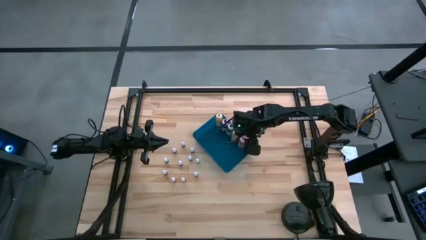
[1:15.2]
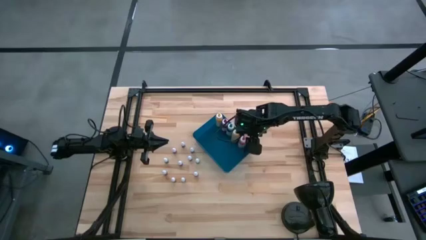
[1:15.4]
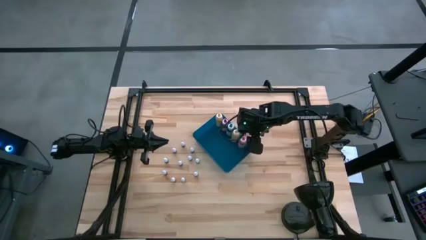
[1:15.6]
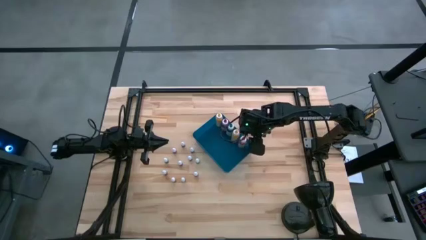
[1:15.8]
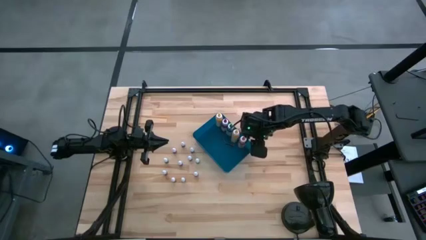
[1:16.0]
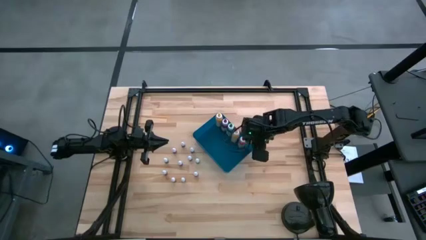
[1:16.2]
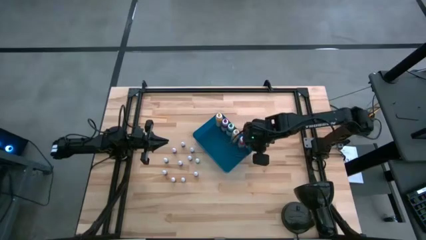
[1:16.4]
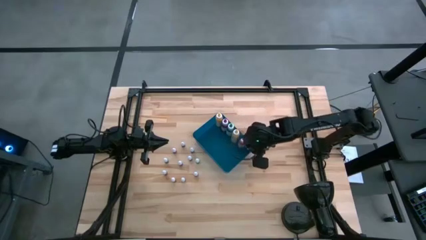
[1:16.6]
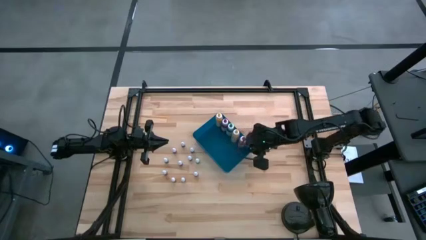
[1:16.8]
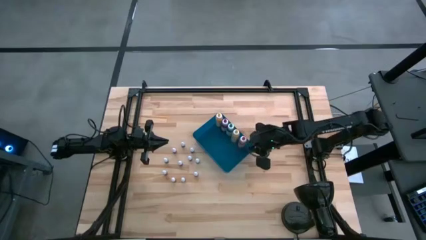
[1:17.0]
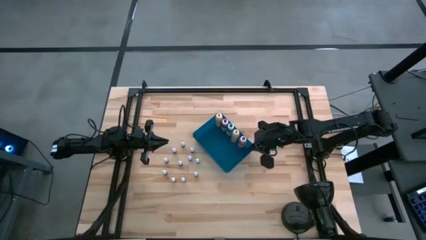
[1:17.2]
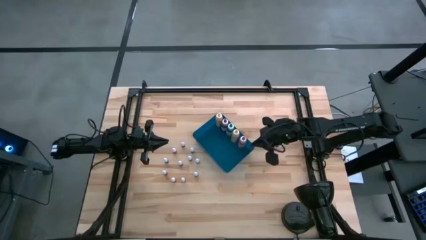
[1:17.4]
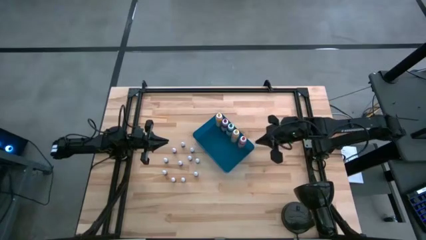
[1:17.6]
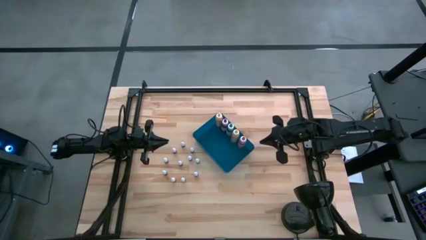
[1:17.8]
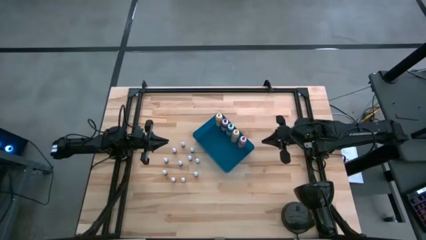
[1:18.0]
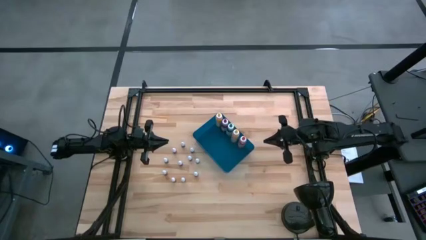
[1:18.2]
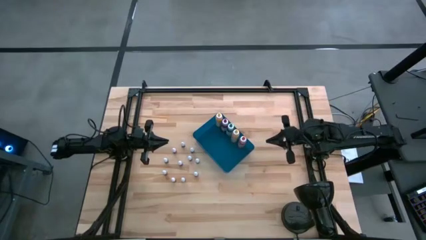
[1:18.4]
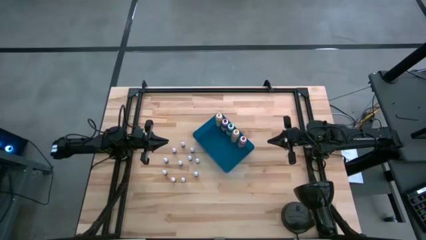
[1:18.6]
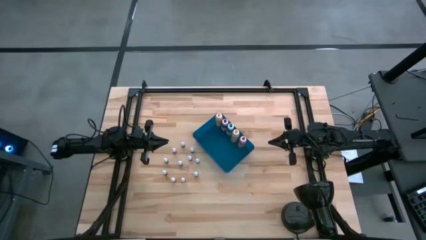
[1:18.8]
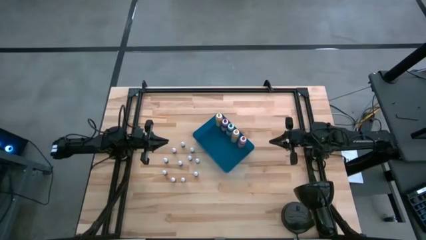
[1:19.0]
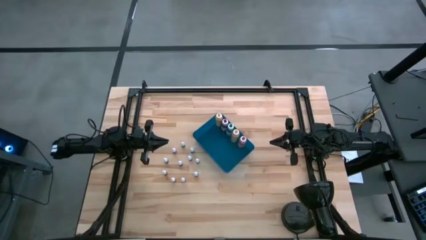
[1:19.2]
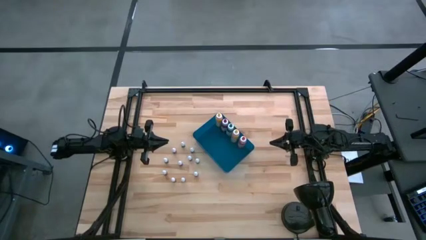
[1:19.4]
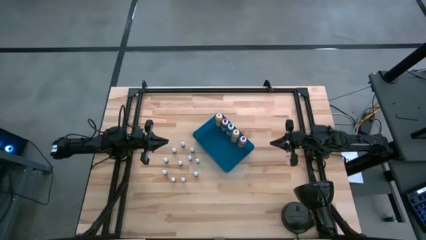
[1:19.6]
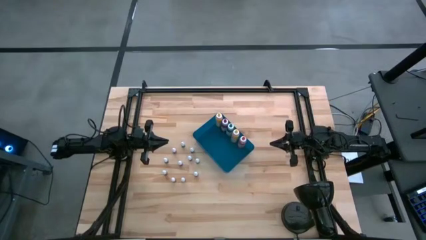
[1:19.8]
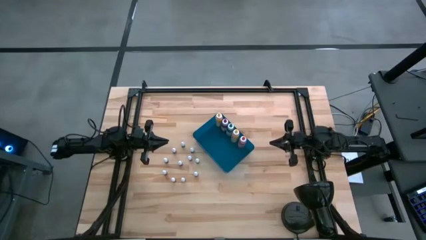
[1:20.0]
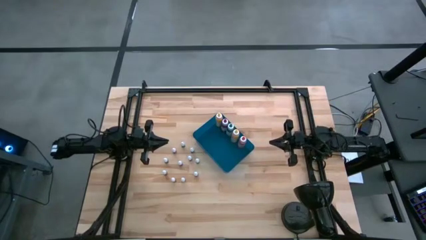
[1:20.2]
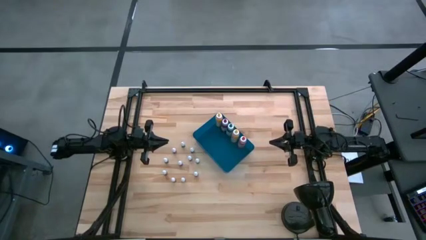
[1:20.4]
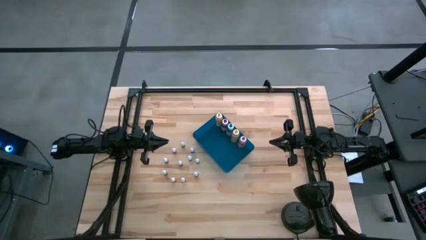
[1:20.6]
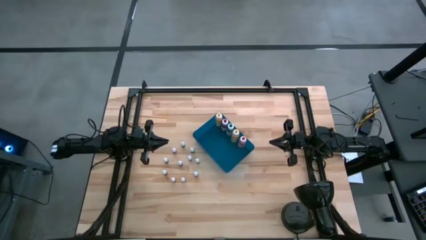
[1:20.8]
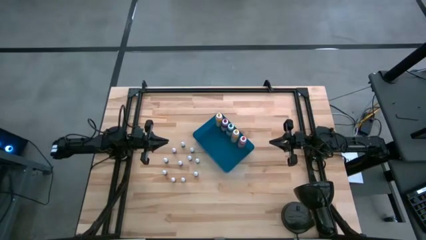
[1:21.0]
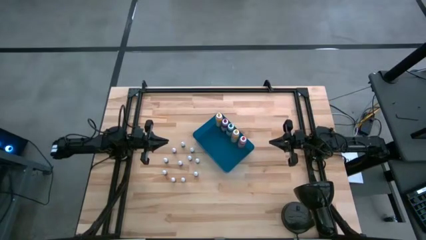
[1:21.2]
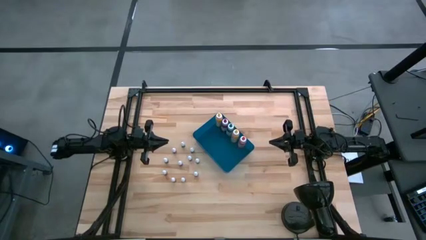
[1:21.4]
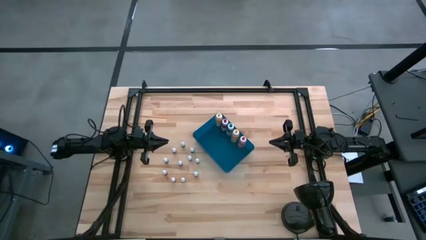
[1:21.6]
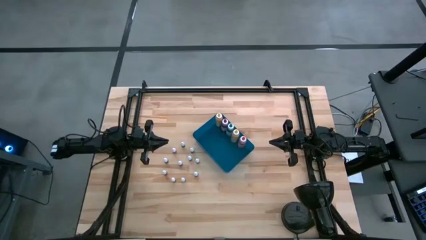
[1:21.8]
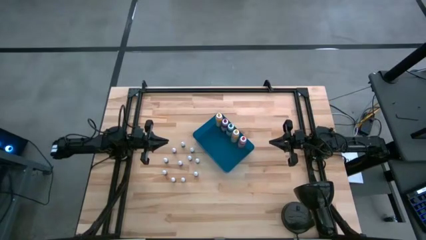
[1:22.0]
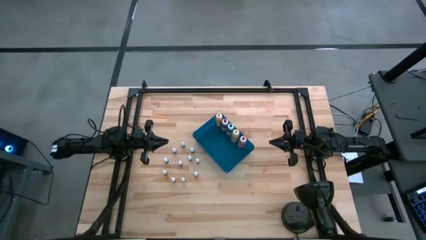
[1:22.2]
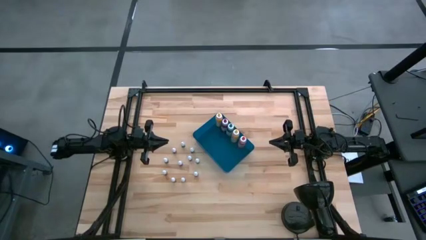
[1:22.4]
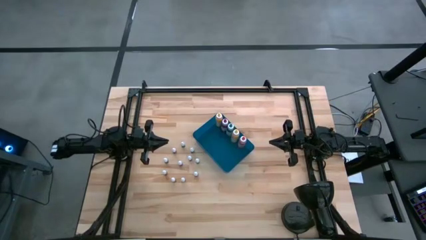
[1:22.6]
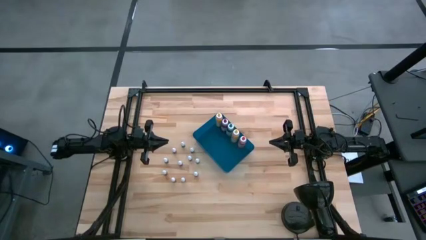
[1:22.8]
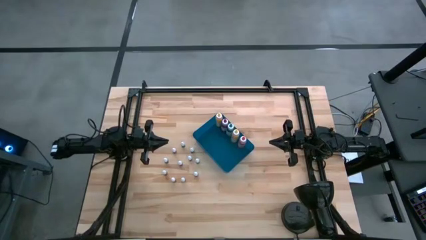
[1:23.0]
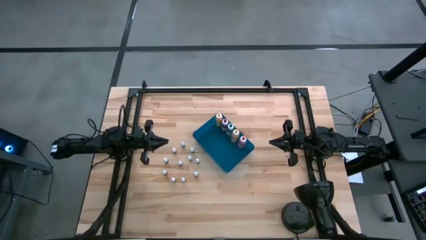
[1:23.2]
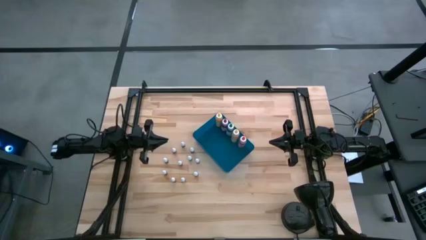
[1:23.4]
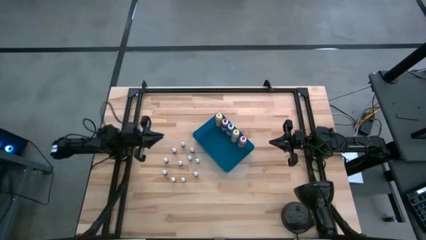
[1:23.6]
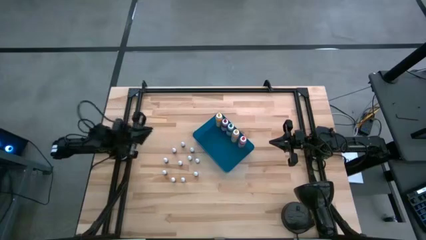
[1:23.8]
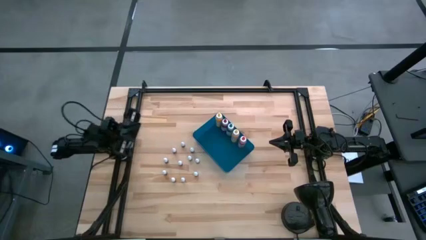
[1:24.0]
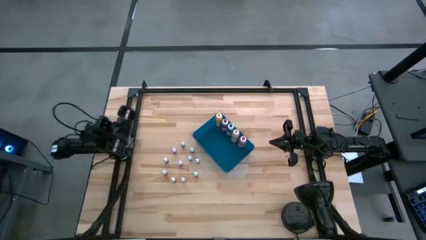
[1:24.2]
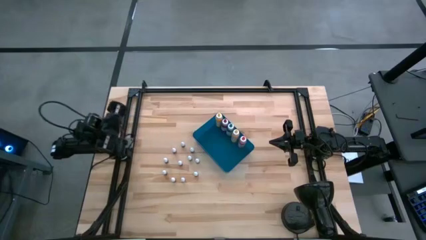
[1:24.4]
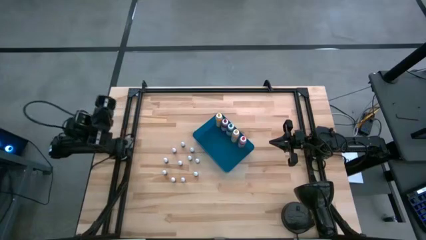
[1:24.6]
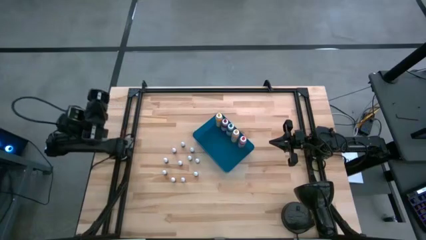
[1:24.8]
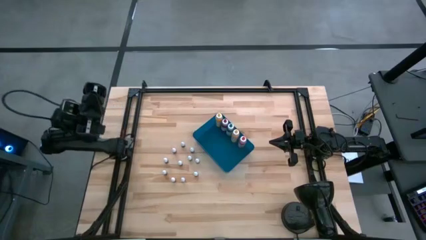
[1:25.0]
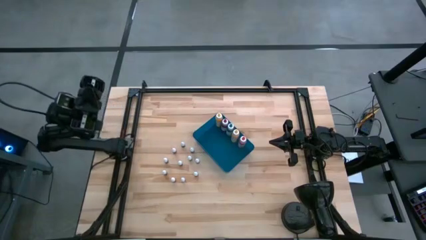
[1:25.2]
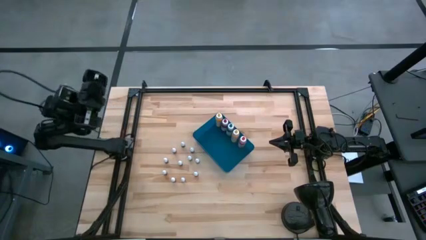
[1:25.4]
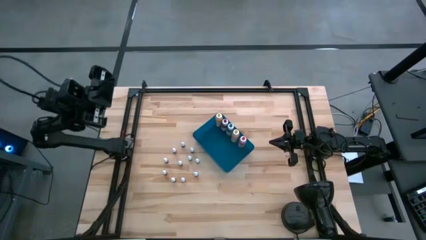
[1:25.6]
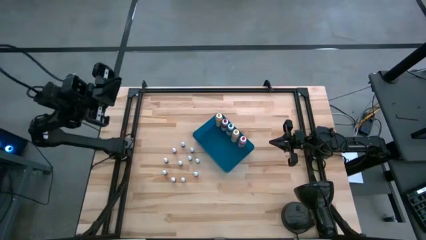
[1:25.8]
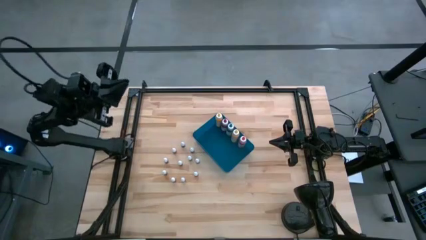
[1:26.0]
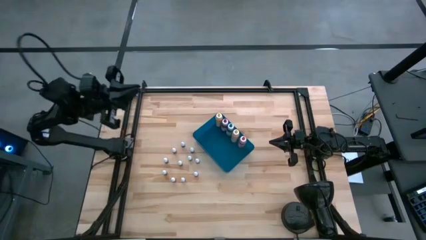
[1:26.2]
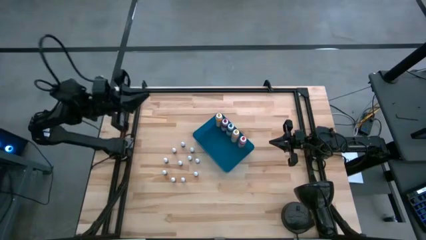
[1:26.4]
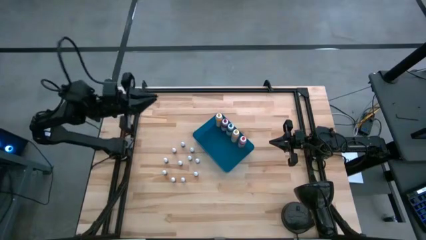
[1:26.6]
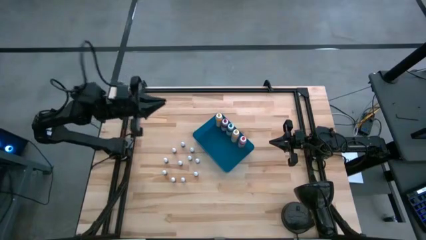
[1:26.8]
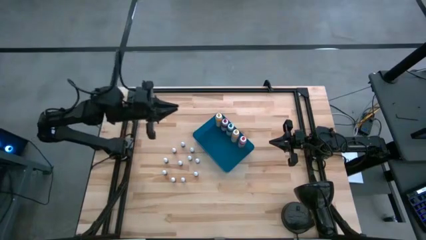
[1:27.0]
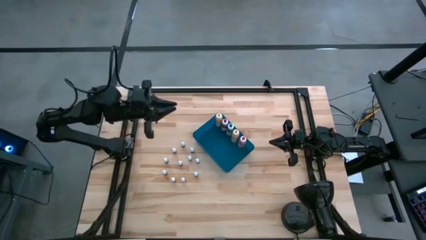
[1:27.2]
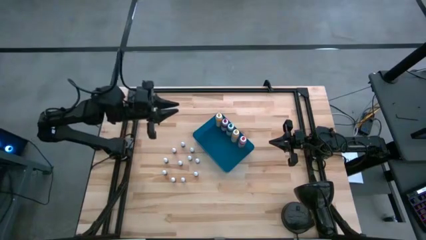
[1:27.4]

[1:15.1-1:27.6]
Task: Pick & Place food coloring
Put the green food coloring bottle into the blue bin

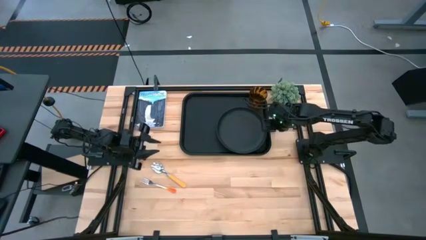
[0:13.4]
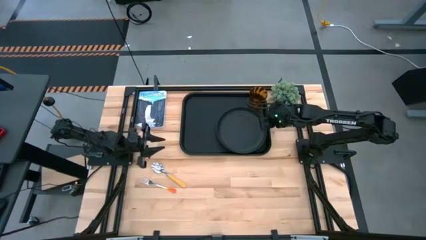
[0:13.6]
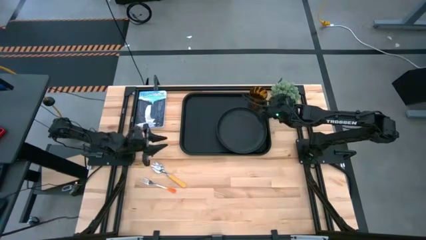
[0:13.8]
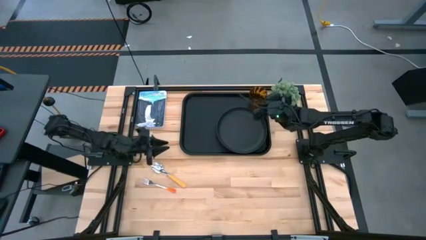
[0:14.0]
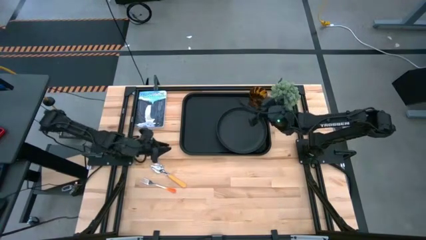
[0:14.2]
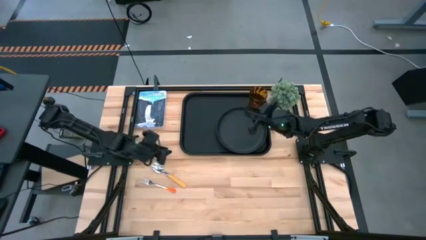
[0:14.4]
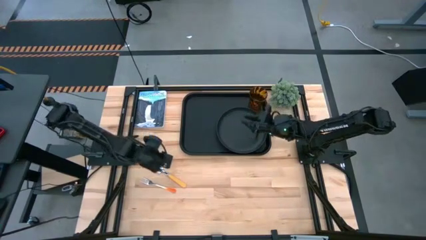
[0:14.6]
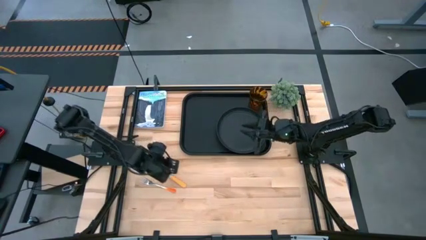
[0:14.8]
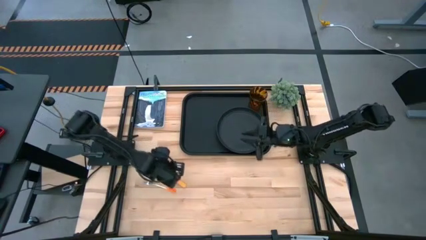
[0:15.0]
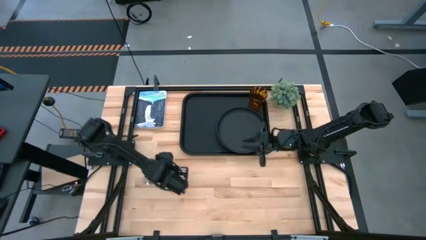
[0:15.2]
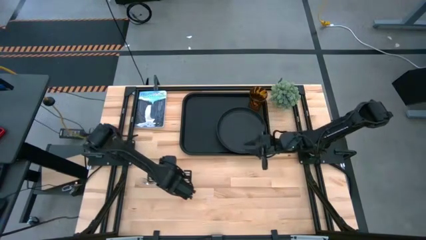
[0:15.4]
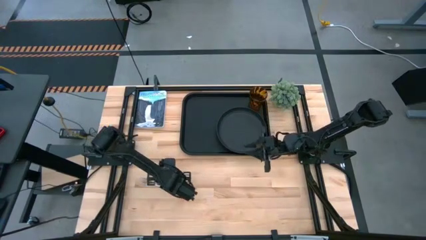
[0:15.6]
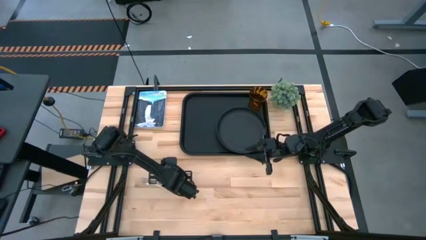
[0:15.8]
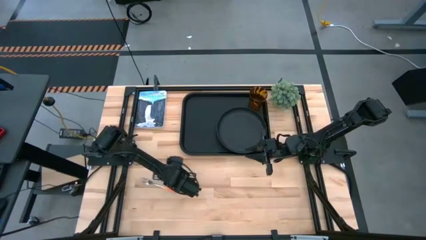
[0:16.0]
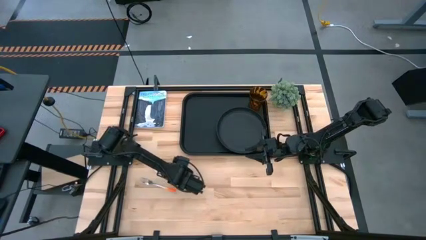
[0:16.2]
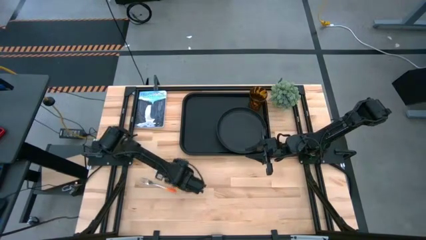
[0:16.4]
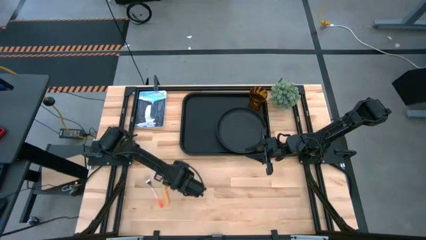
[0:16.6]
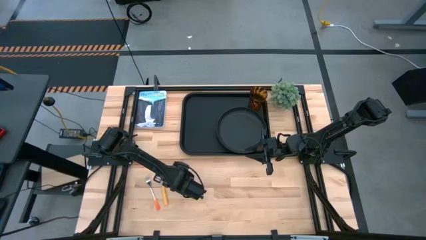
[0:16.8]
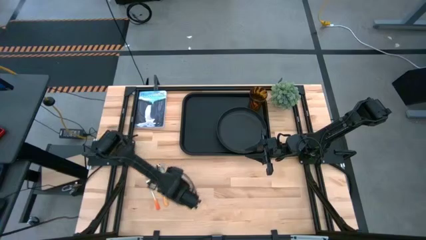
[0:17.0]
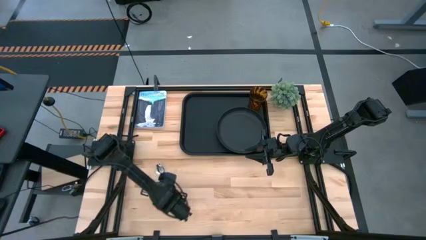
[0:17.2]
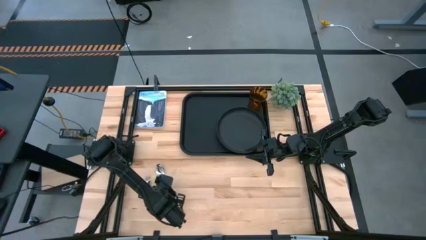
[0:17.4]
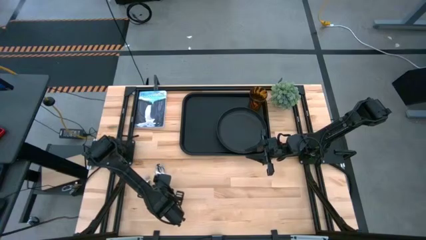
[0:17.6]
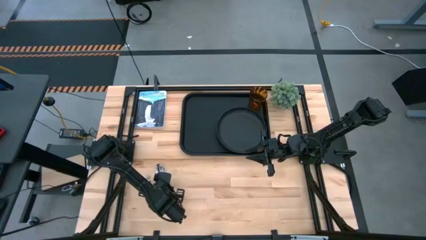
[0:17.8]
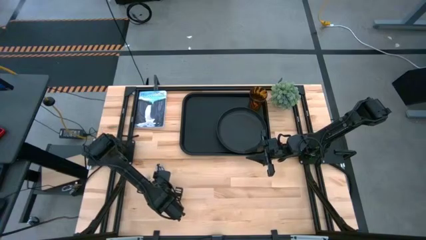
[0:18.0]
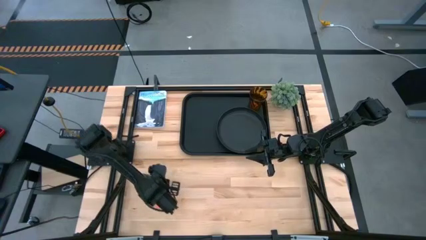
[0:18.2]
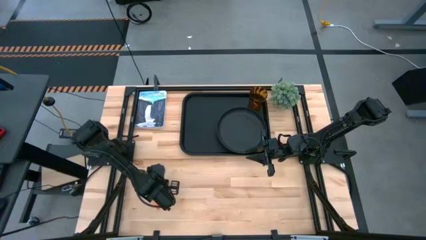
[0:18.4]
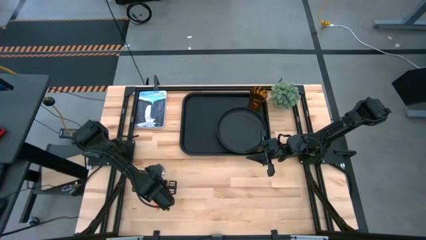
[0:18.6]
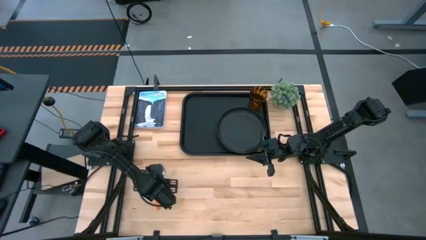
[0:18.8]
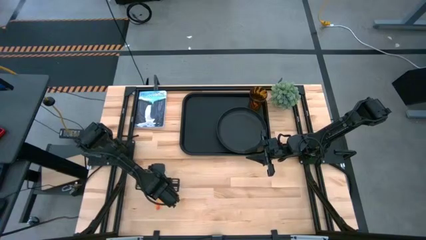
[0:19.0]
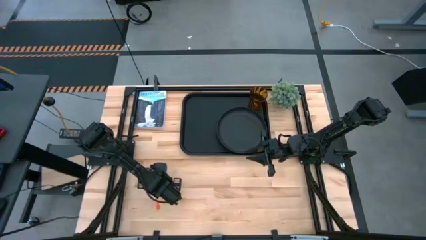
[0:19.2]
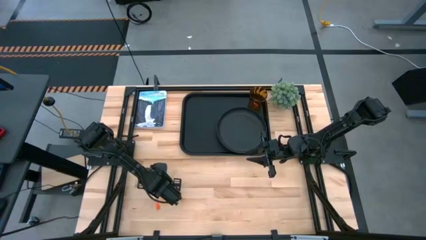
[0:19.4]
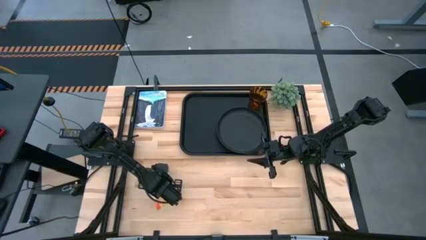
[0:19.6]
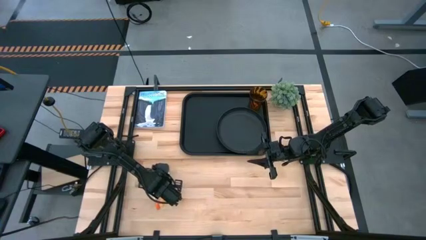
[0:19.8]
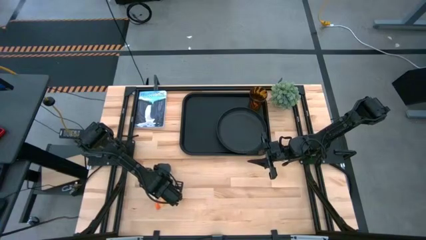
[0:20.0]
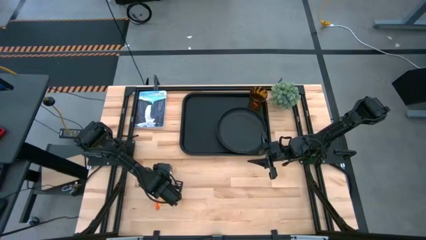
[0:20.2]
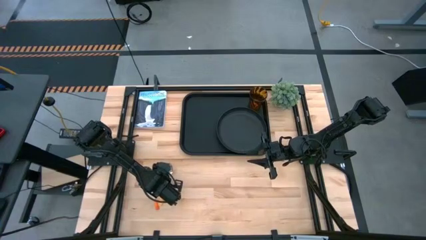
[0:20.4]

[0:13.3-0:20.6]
Task: Pick and place plate/cup/fork/spoon on tray
Put the yellow spoon on the black tray to the left of the black plate
